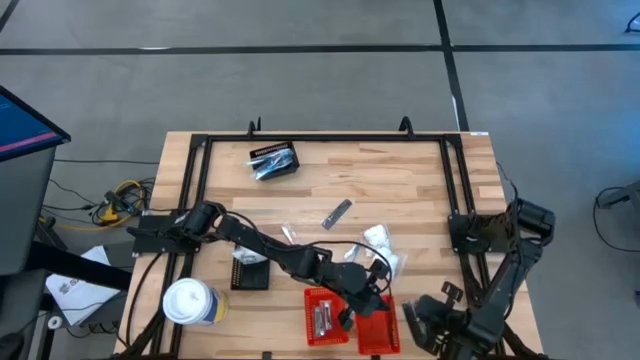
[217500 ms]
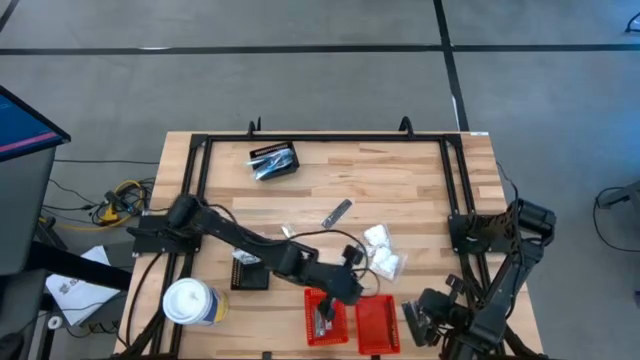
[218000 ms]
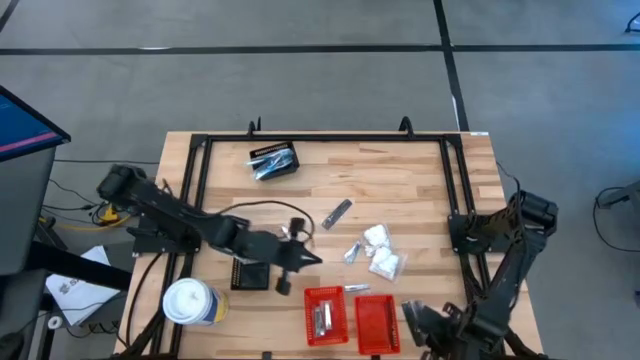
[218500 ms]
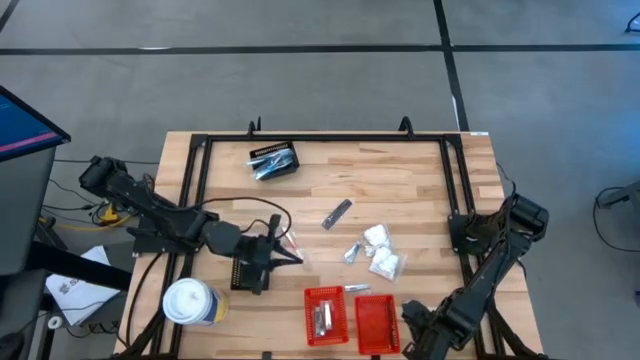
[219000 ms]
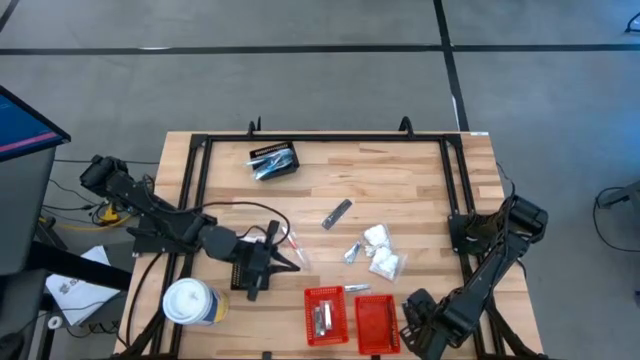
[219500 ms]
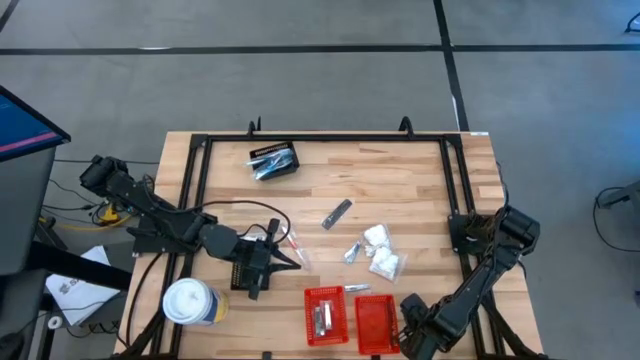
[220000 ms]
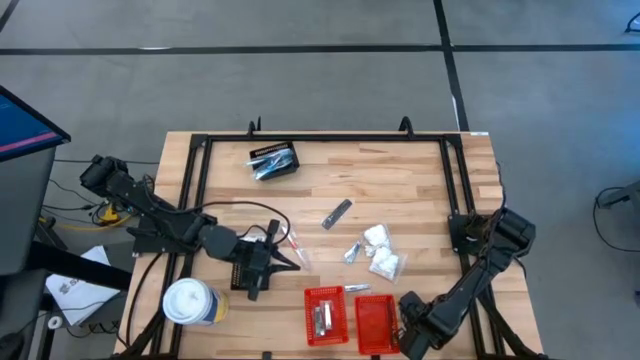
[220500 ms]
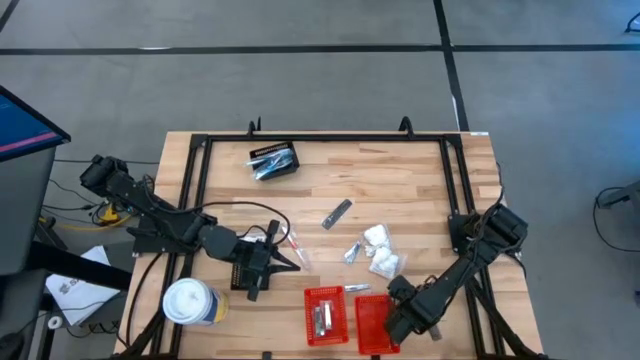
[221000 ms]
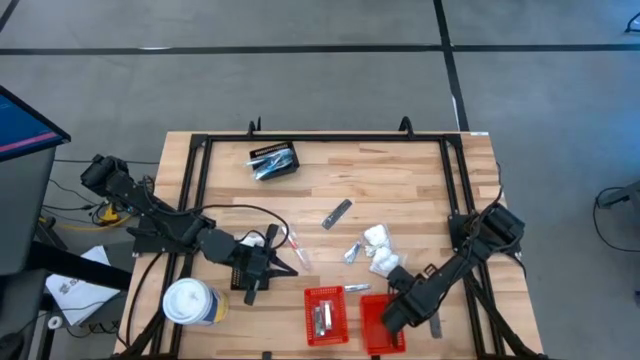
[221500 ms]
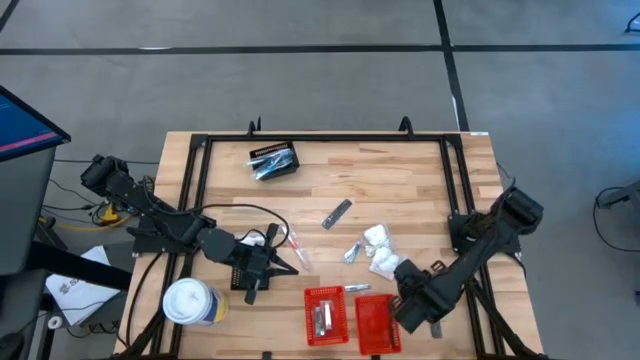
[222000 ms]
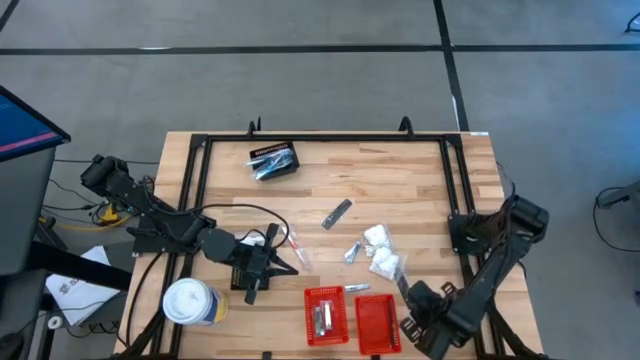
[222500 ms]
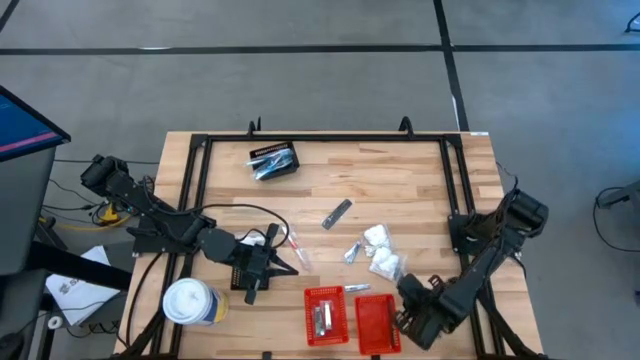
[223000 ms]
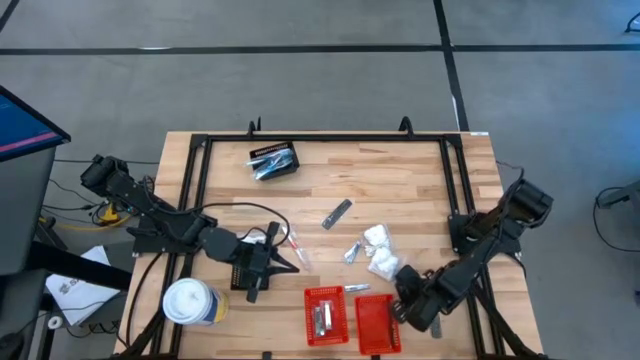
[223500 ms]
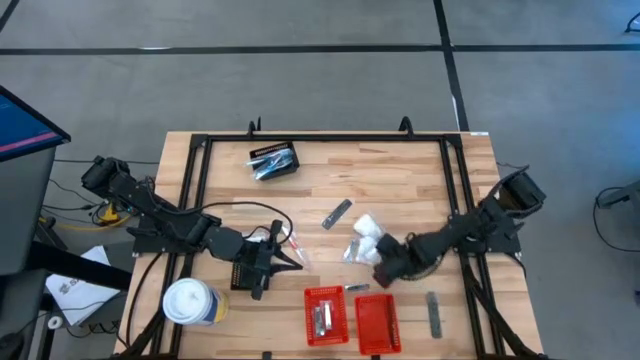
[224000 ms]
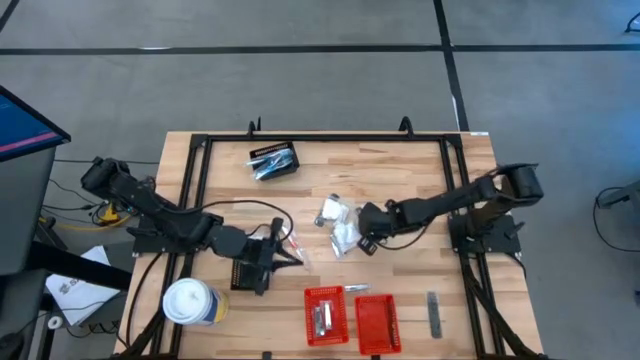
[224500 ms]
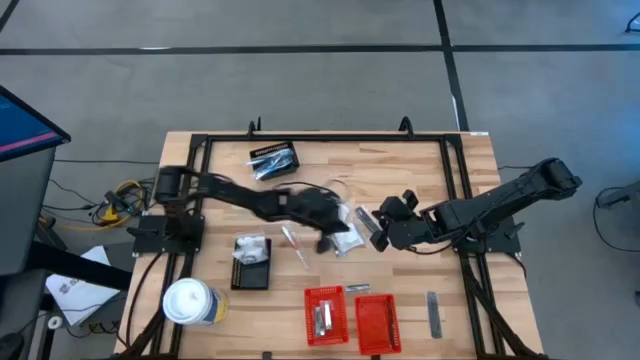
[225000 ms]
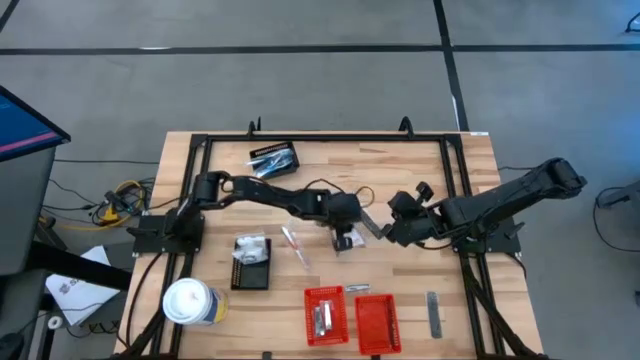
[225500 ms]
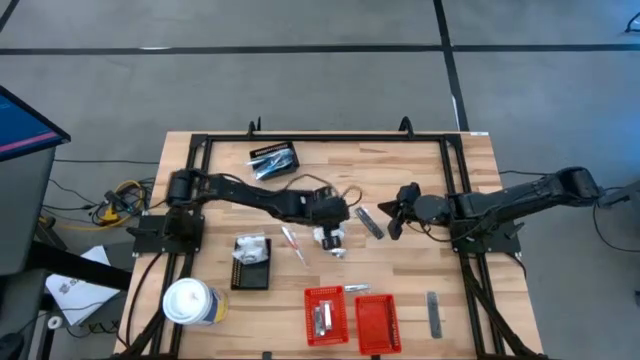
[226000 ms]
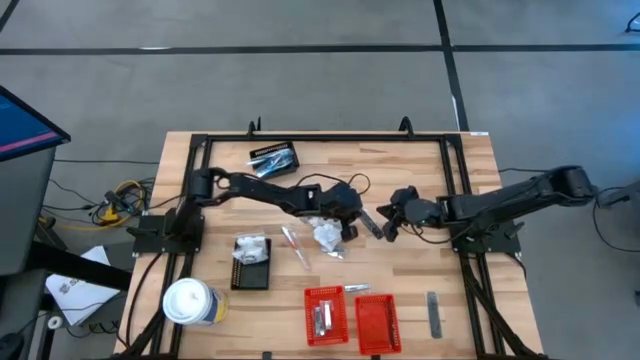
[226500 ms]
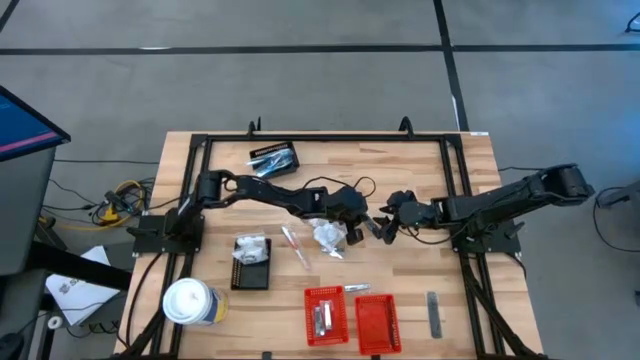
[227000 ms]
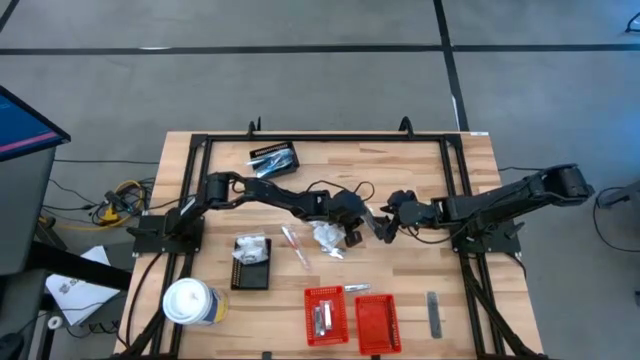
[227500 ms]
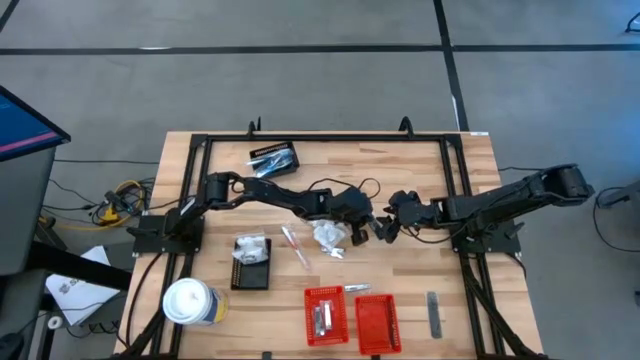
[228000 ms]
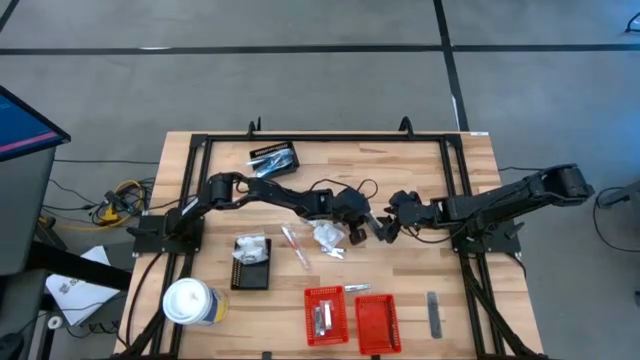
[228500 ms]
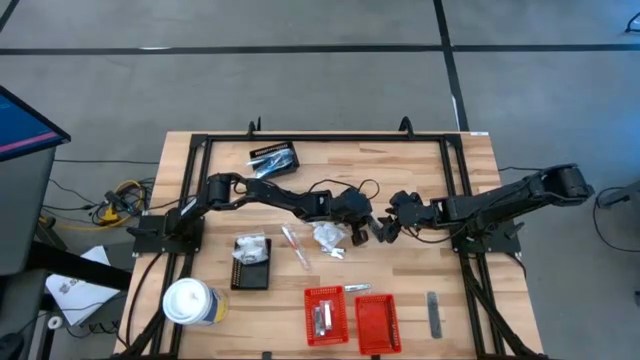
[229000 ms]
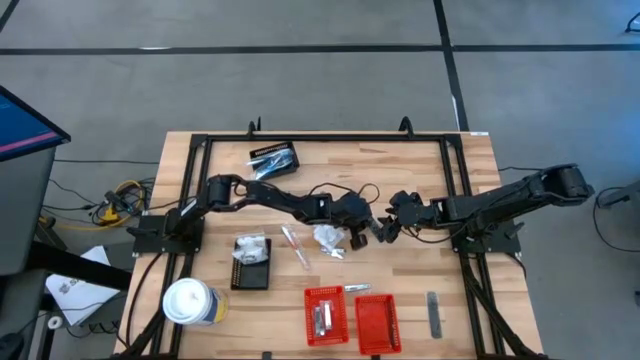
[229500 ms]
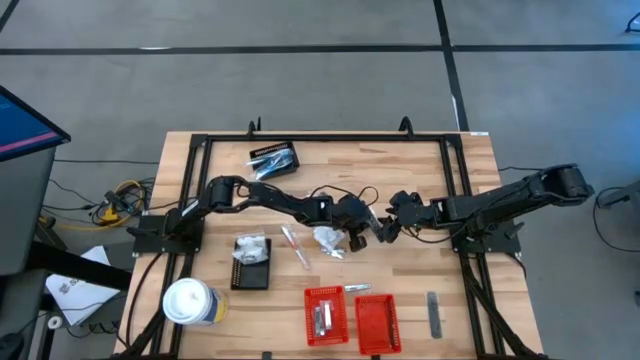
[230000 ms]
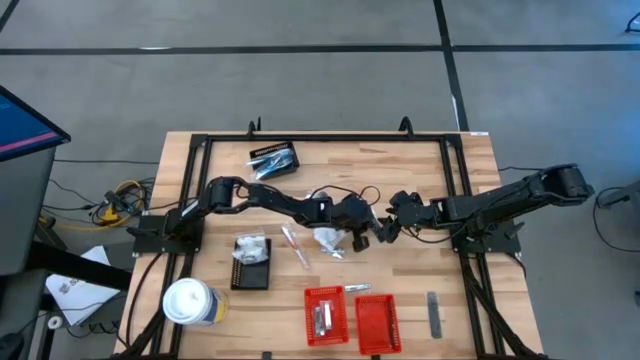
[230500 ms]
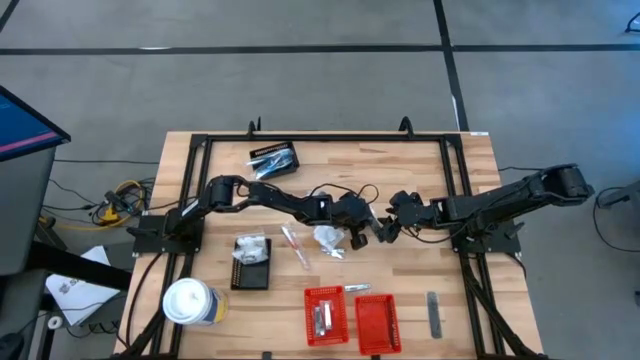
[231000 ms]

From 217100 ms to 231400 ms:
Task: Pick & Place Travel size toiletries
Put the black hair brush into the right red bin

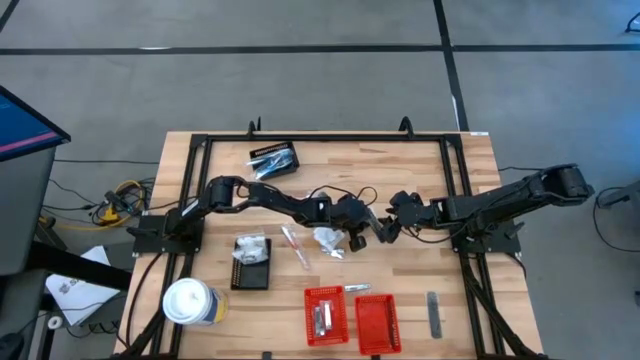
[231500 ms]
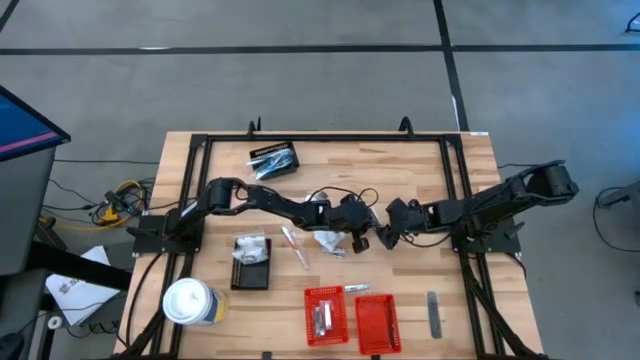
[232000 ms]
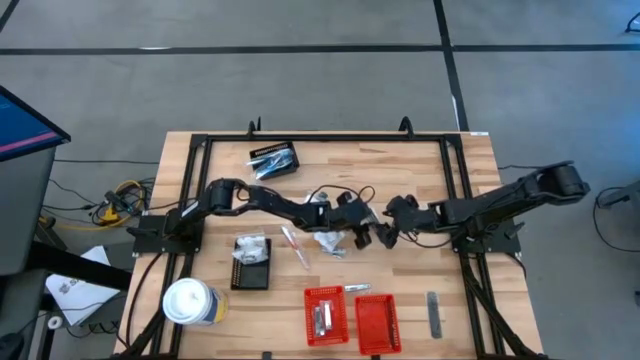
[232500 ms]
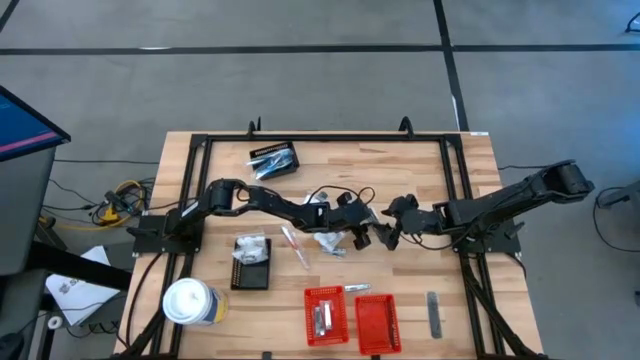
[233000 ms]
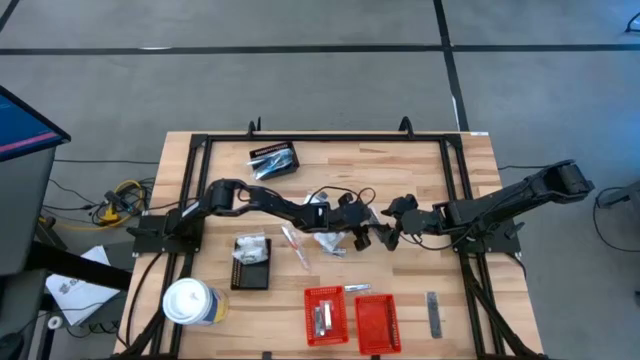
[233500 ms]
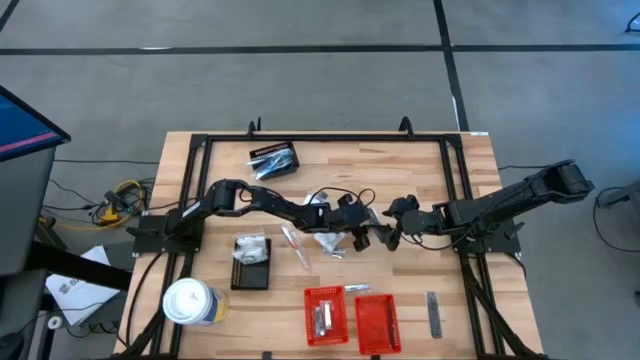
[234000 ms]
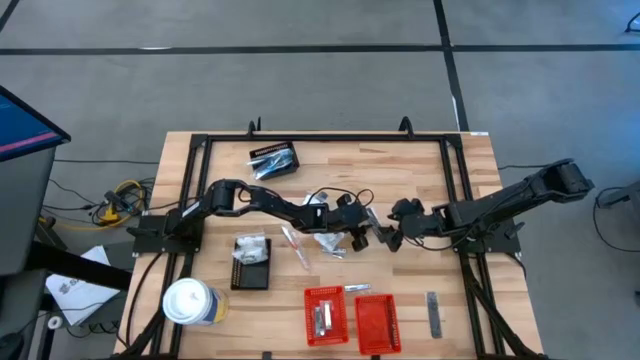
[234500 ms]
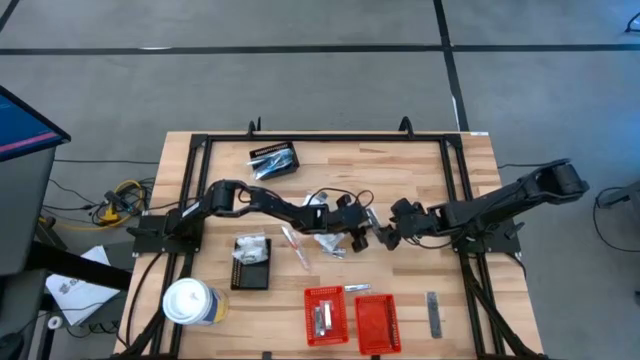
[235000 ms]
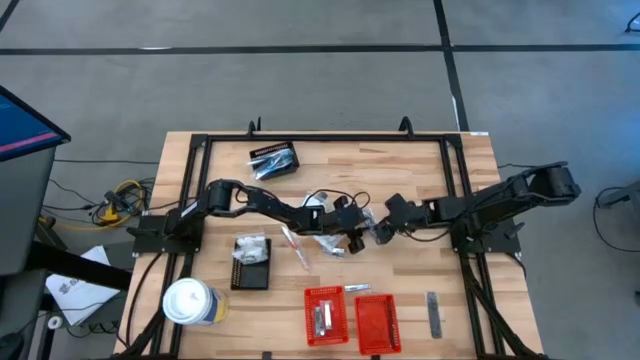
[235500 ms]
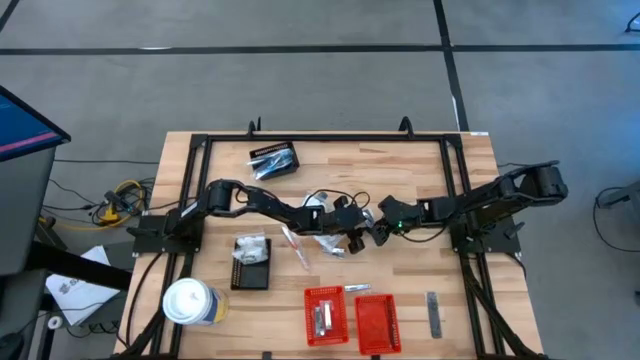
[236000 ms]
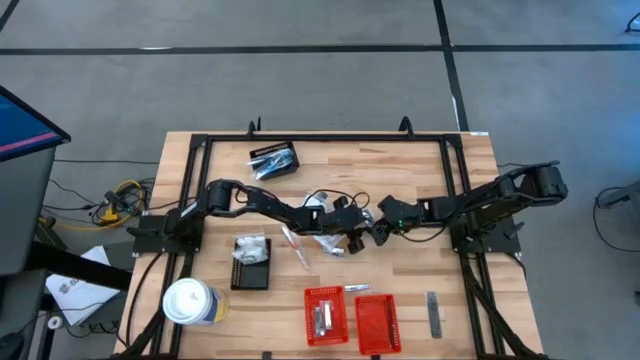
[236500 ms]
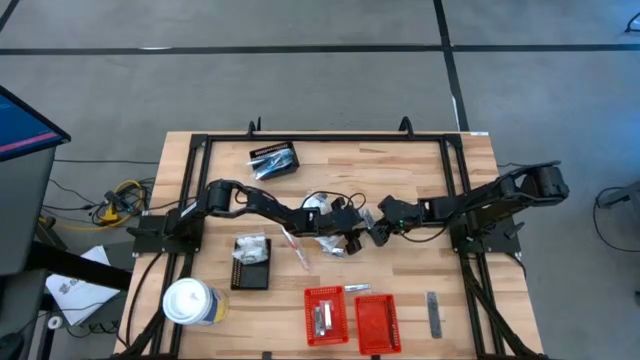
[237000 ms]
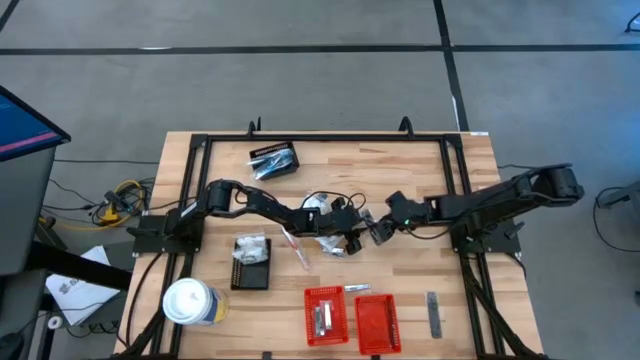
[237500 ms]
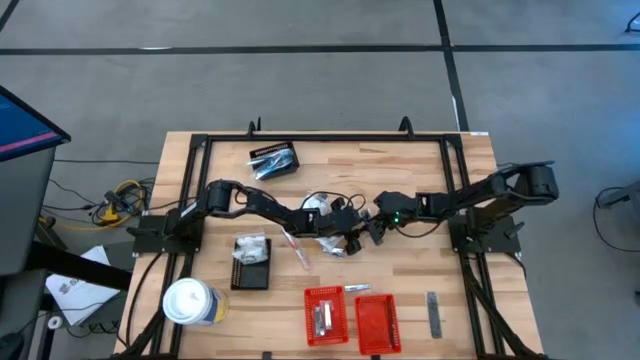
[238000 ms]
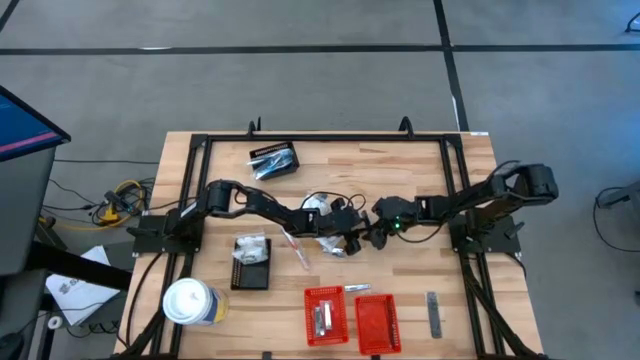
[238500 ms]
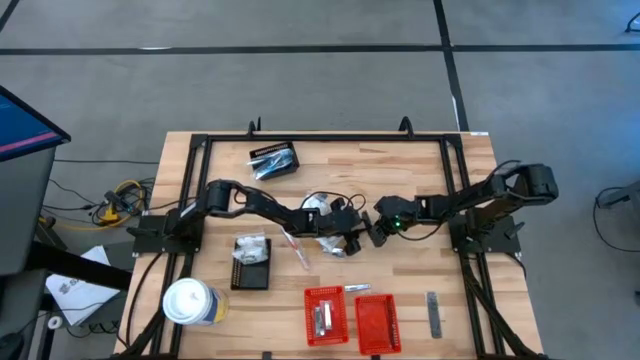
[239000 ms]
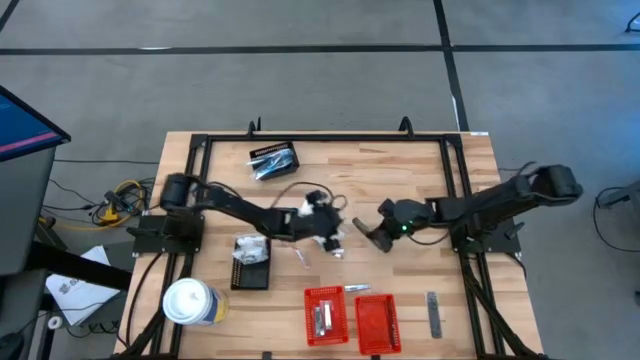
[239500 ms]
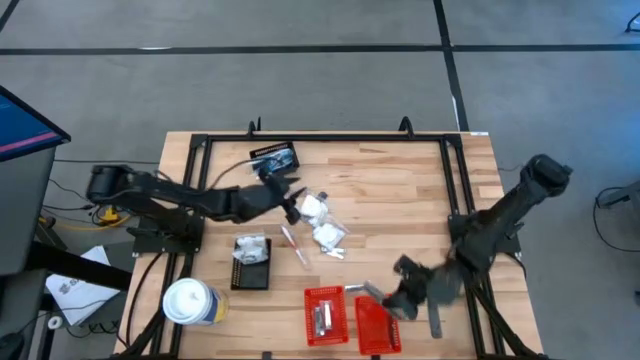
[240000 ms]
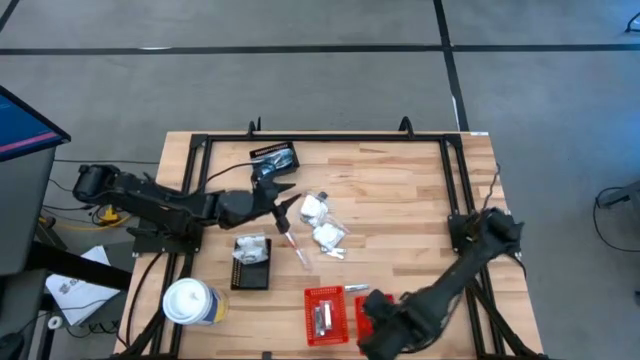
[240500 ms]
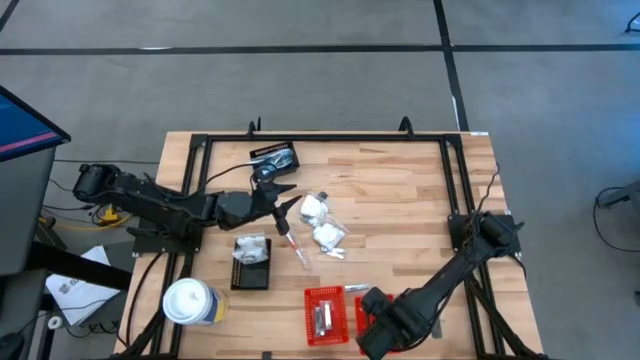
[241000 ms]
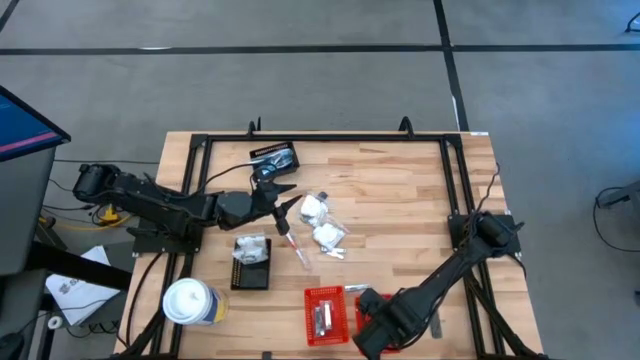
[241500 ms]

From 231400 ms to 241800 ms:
Put the black hair brush into the right red bin
